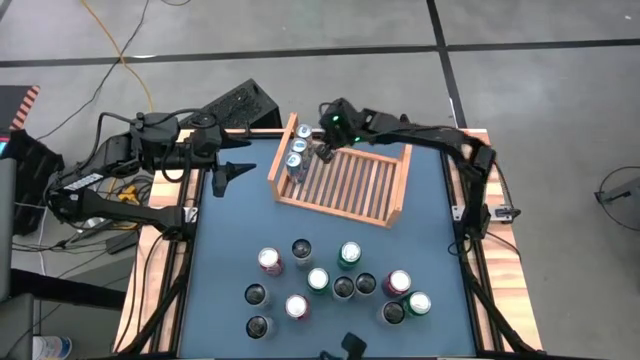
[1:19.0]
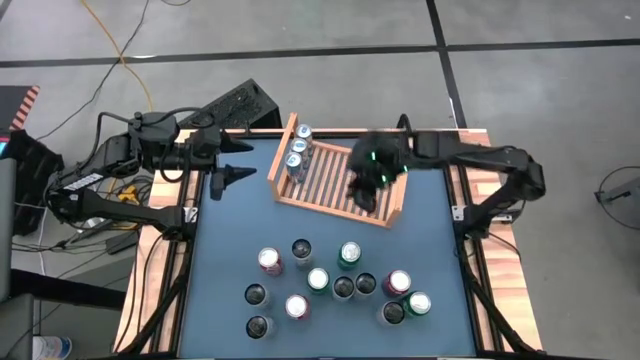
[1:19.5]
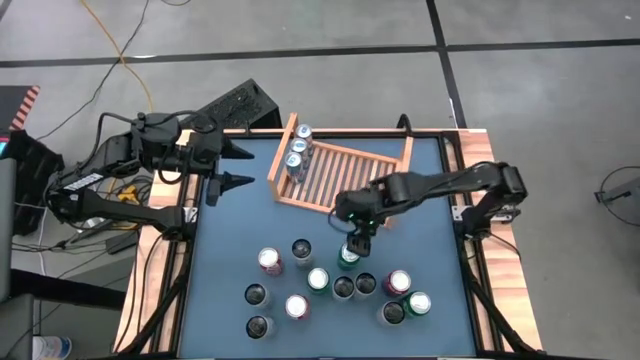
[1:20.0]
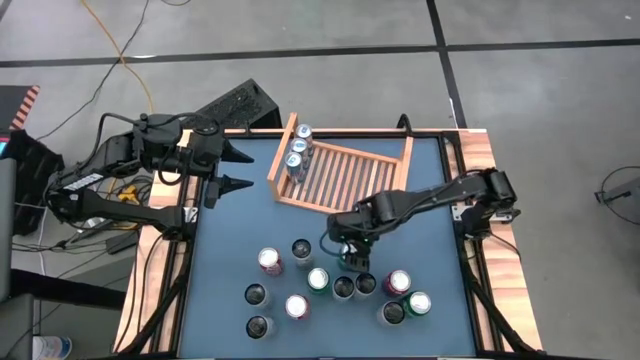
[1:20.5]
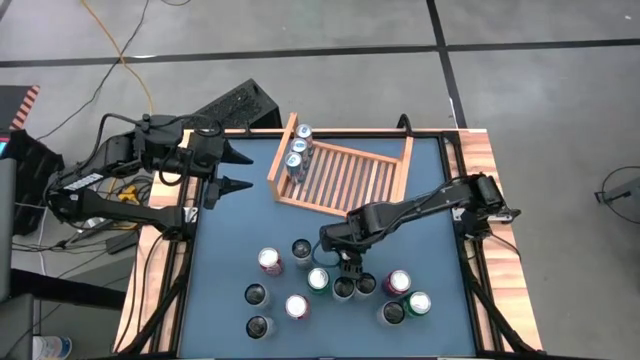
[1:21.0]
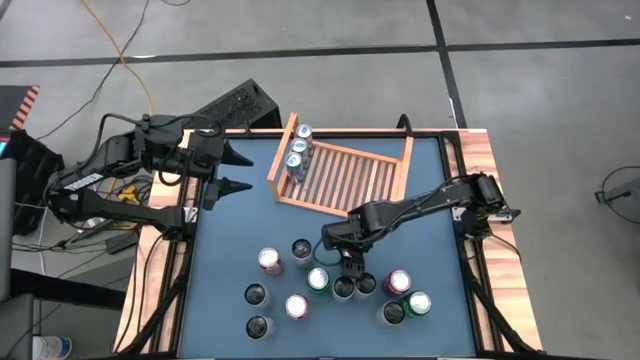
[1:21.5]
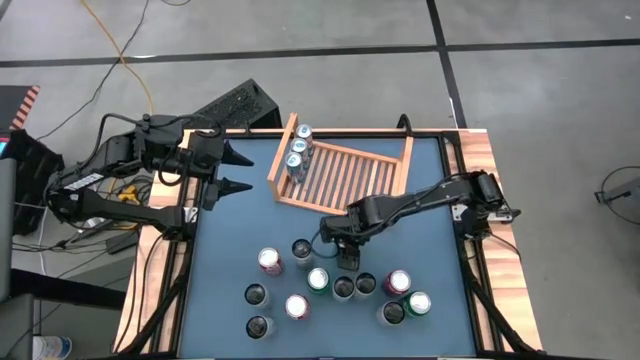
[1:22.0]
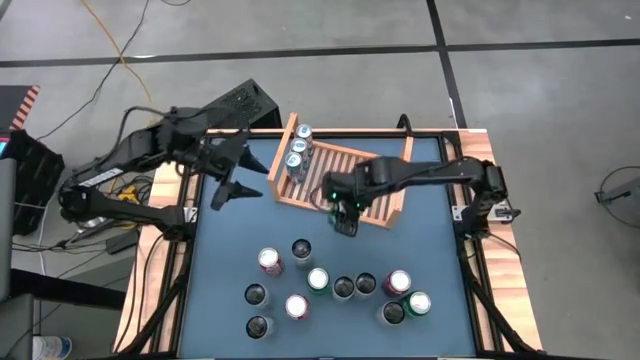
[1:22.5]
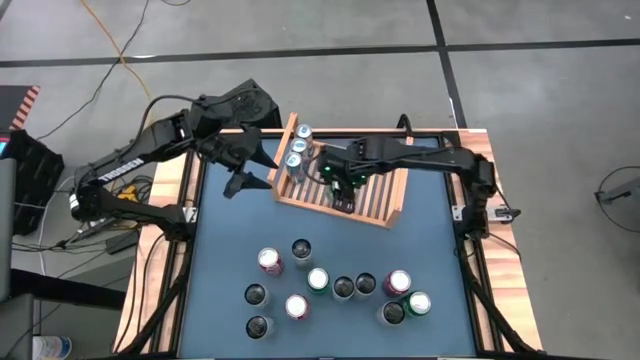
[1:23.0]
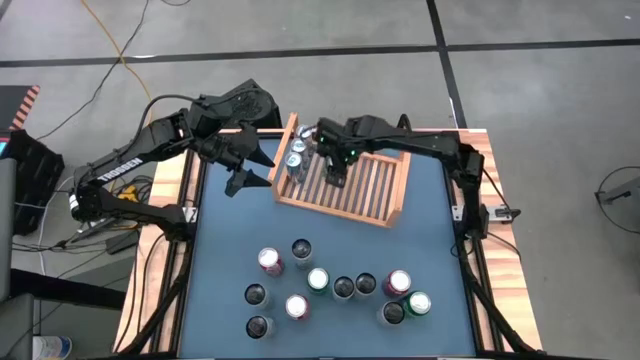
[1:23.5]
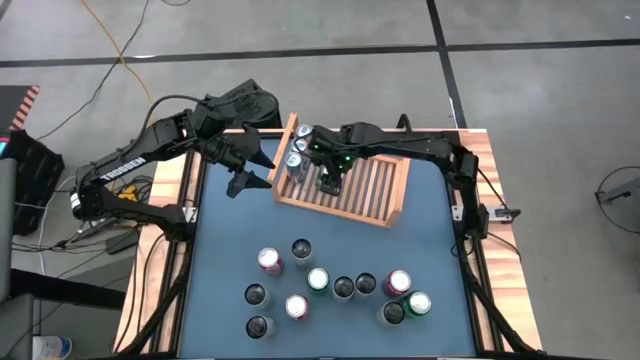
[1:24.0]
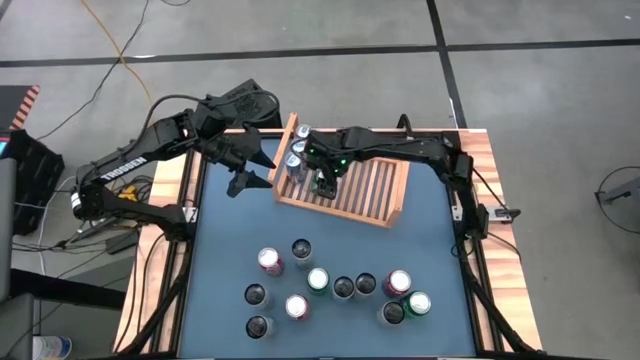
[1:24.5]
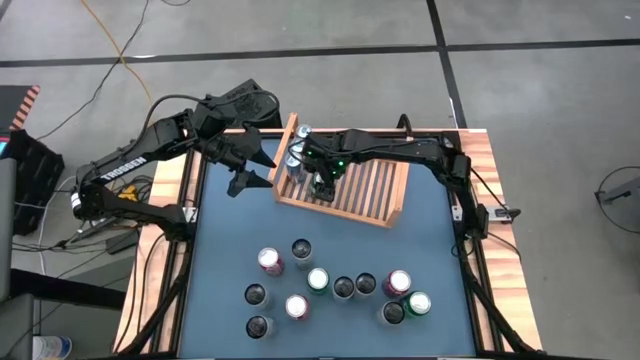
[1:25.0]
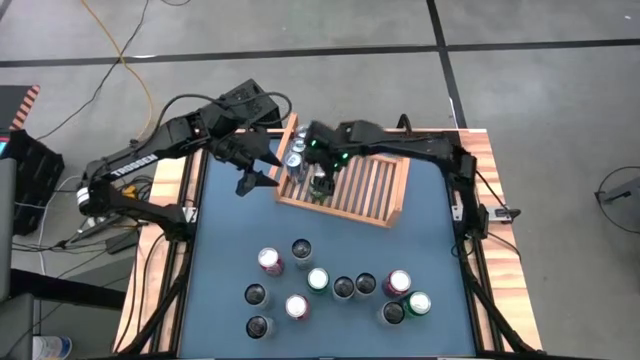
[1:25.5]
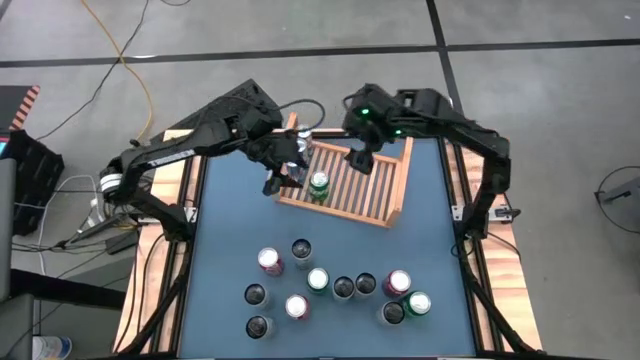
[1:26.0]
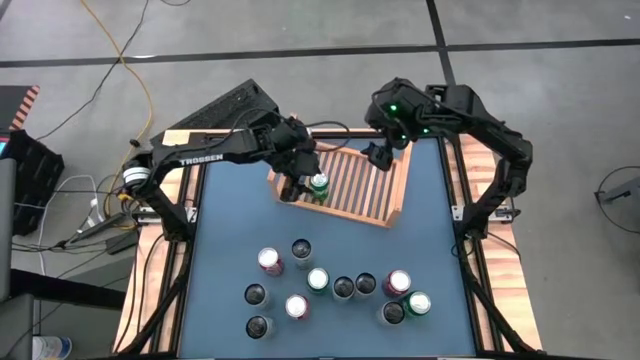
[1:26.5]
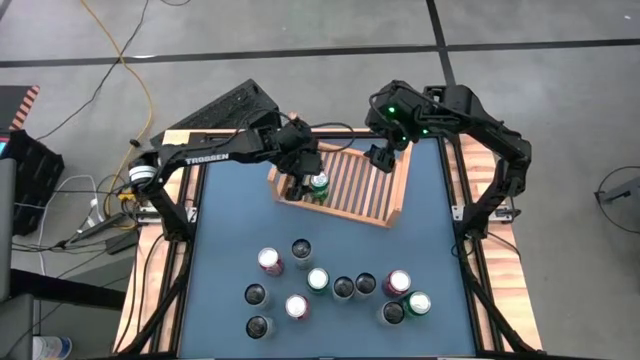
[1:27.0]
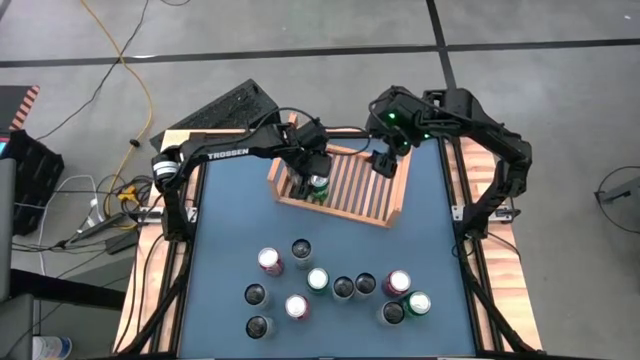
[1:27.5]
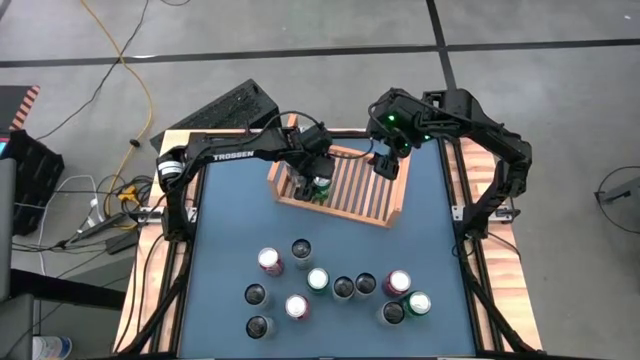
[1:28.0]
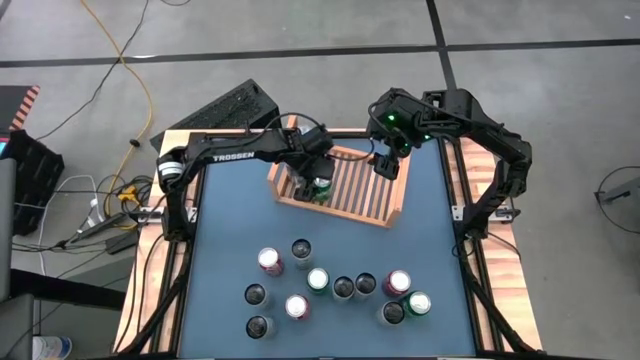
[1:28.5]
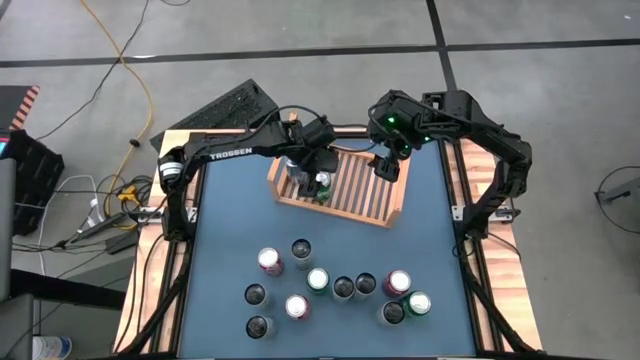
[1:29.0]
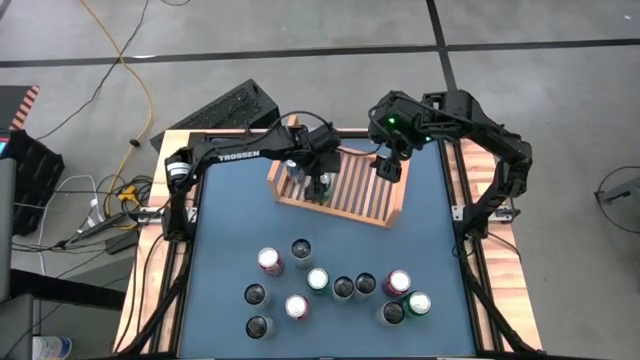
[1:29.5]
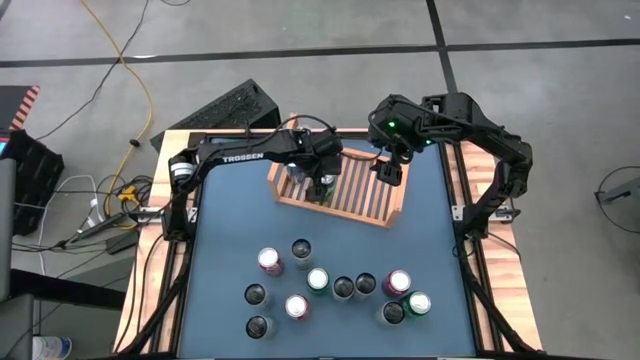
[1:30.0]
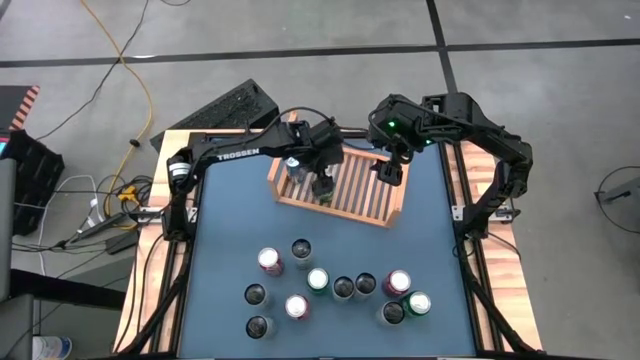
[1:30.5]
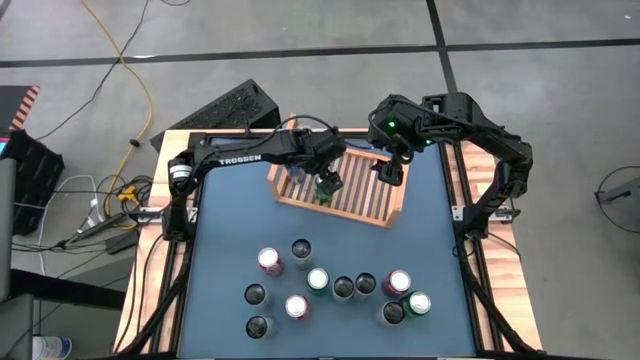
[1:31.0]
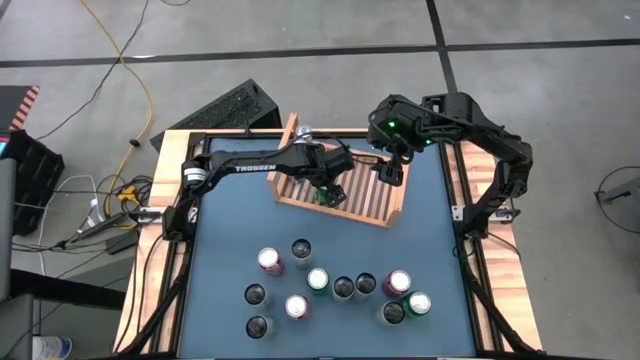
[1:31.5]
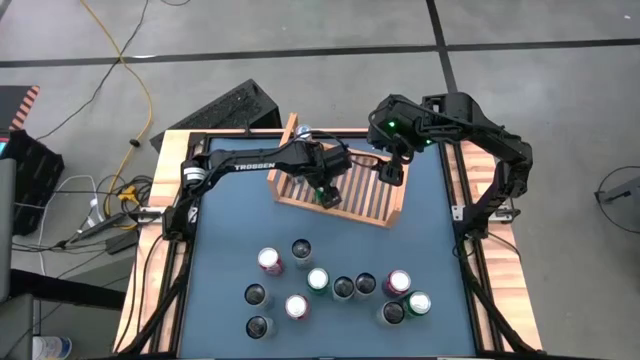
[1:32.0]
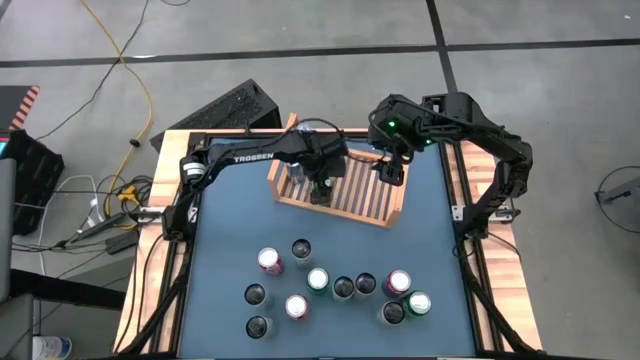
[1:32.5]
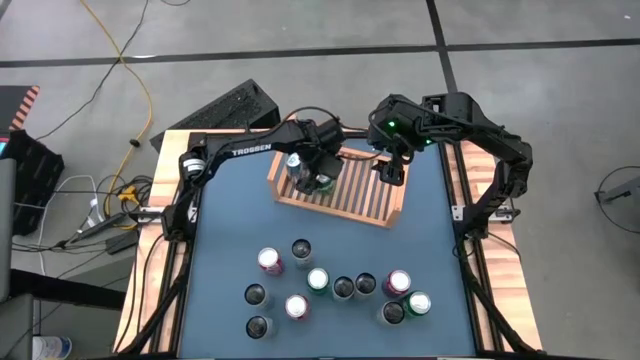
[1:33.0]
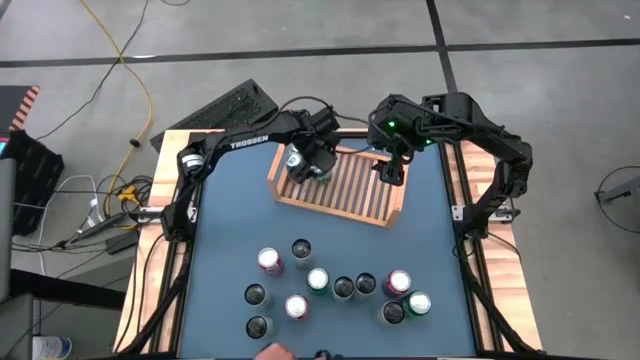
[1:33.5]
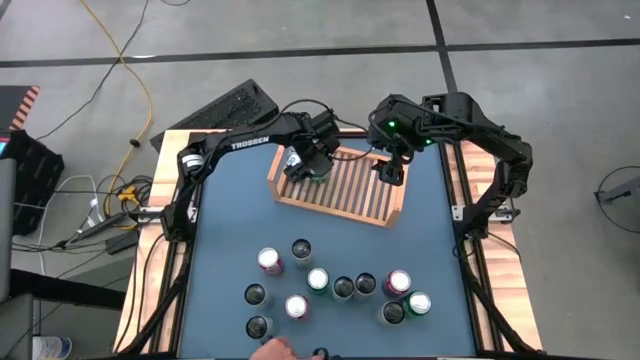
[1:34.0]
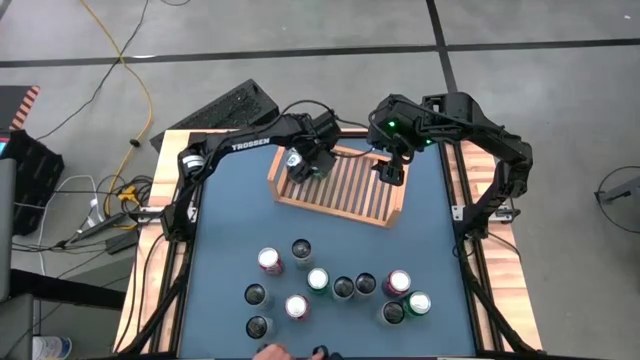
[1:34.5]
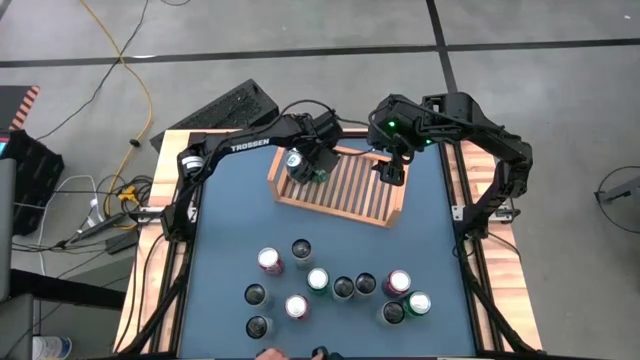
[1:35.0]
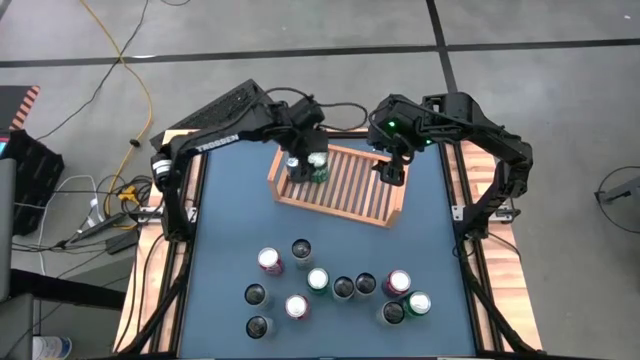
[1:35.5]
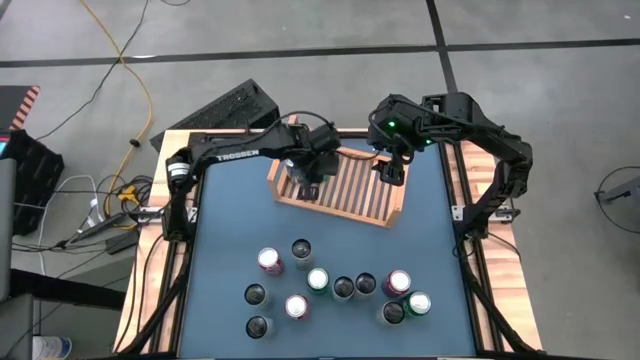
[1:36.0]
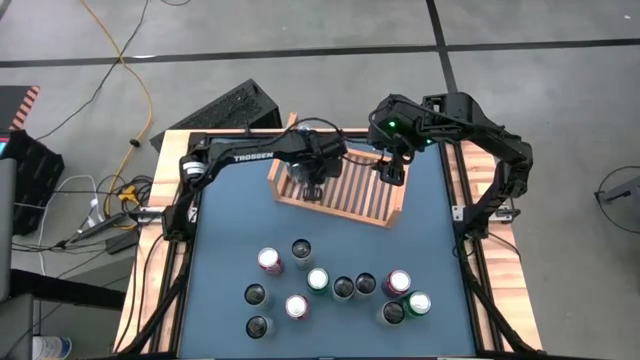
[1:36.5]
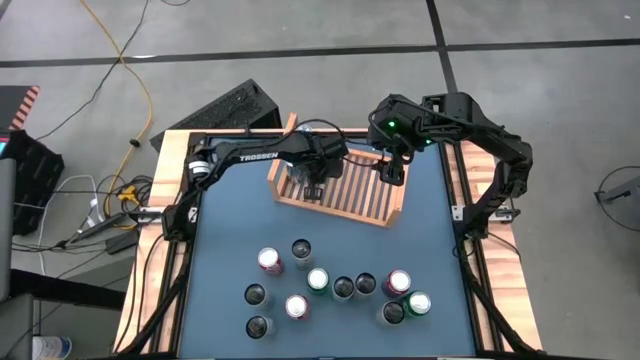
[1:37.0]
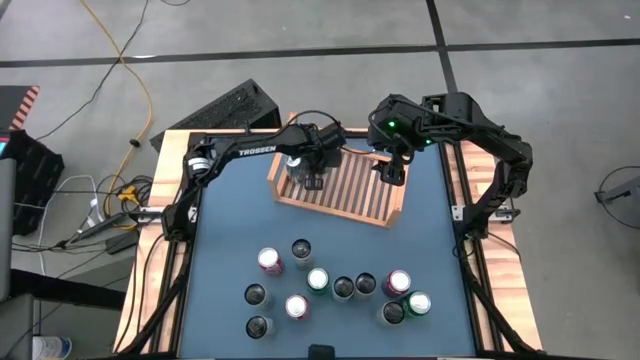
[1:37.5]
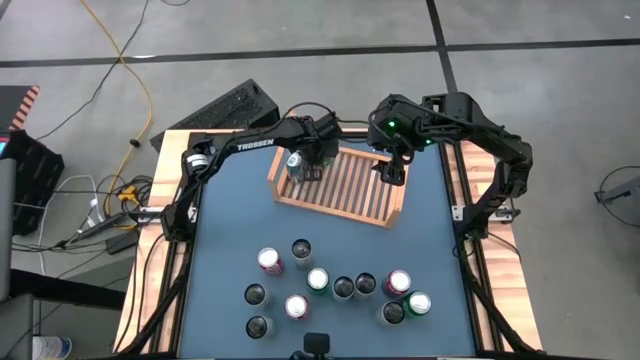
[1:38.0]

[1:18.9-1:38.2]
Task: Place canned beverage on shelf
Put the green soda can on the shelf

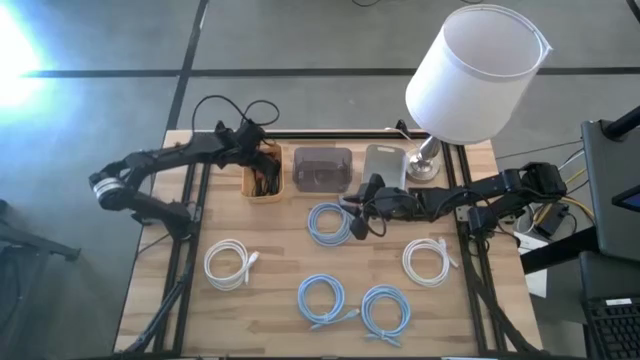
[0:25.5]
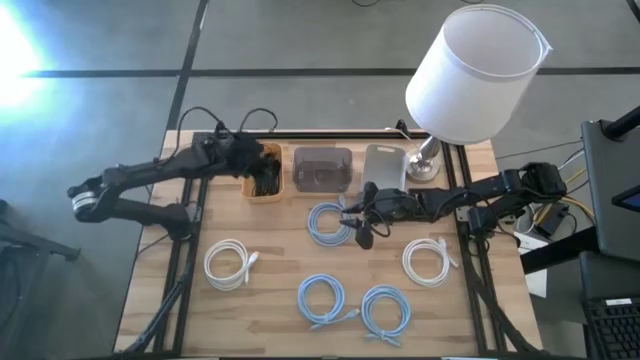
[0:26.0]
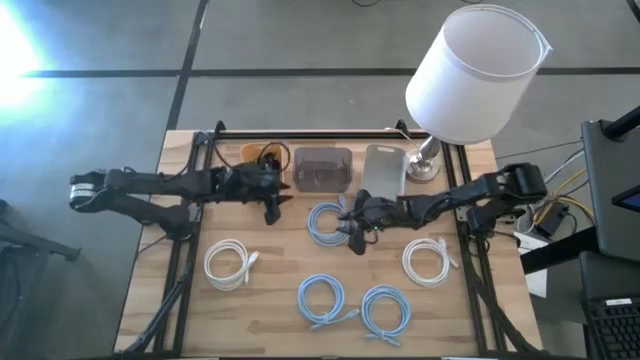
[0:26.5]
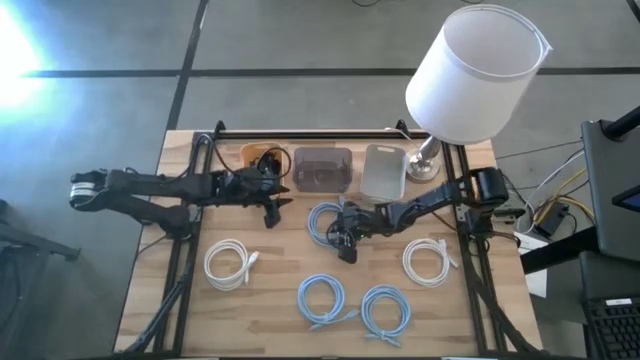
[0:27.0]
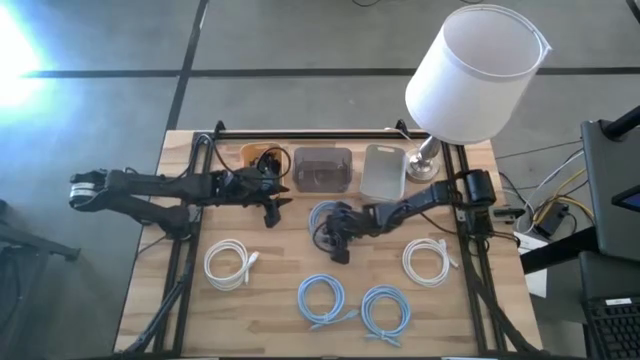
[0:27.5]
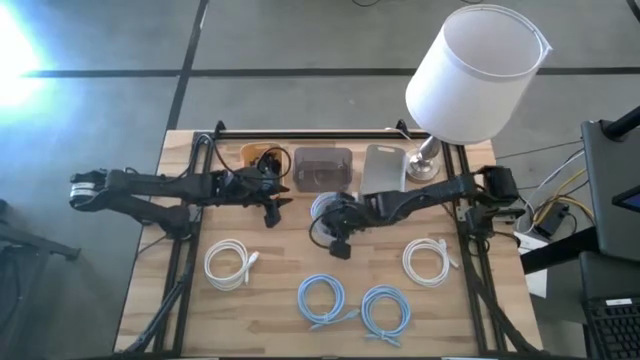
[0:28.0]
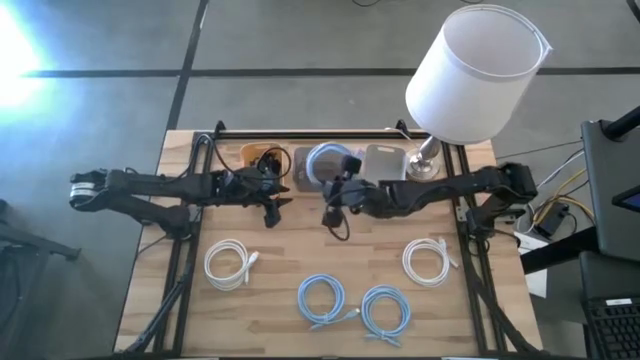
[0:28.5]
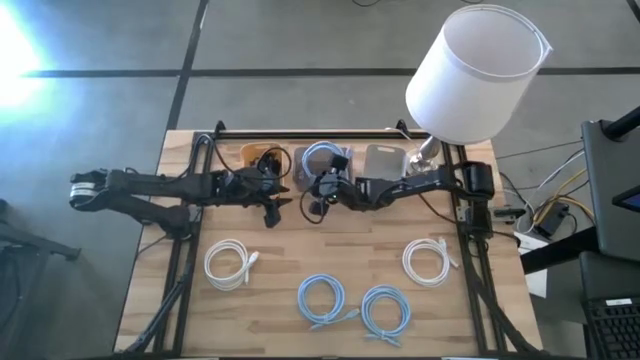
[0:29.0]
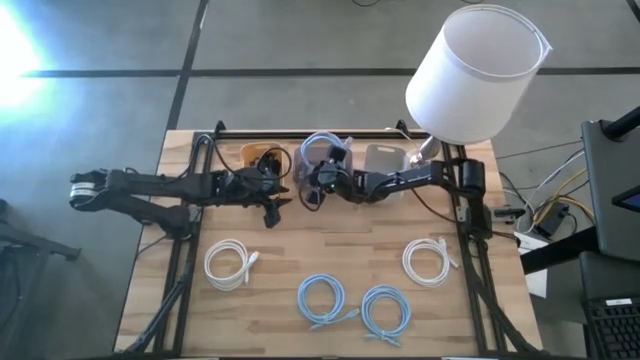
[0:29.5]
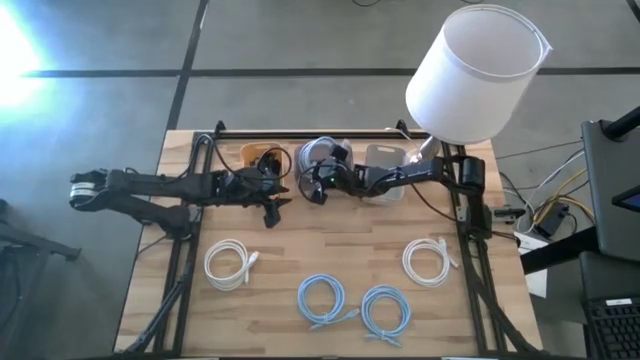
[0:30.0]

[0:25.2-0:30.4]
Task: Pick & Place USB Port
Put the top blue charger cable into the black bin
